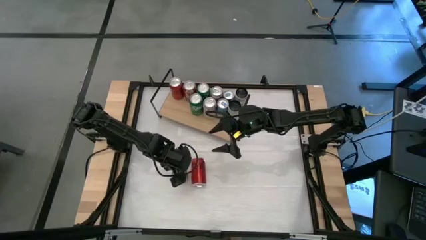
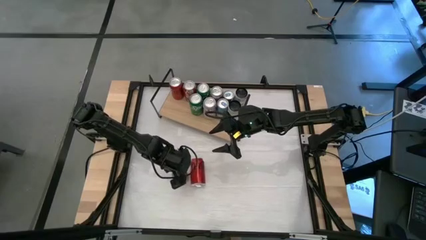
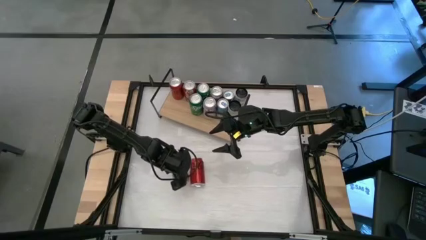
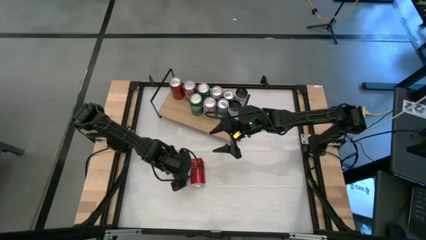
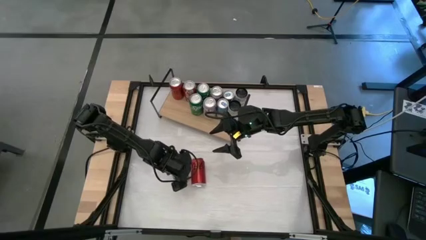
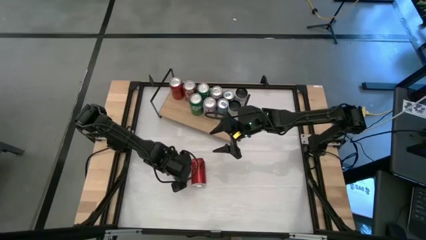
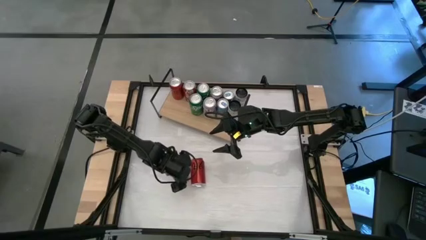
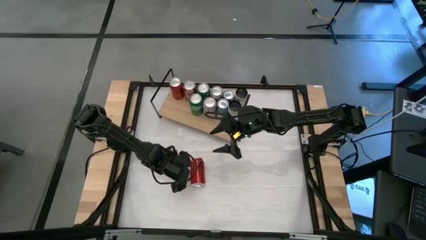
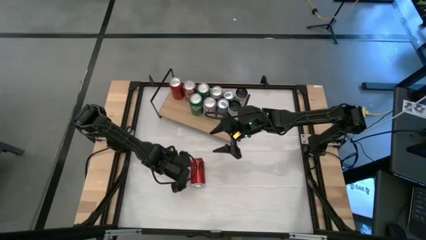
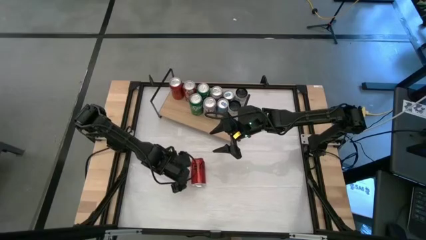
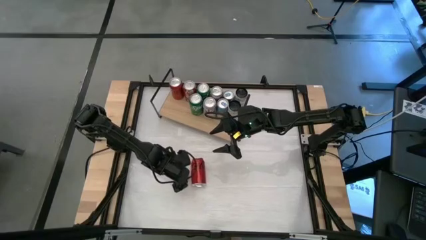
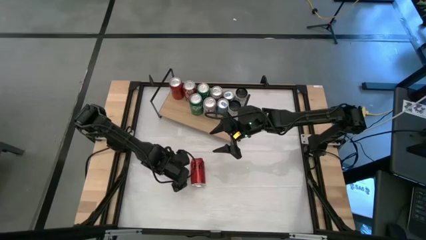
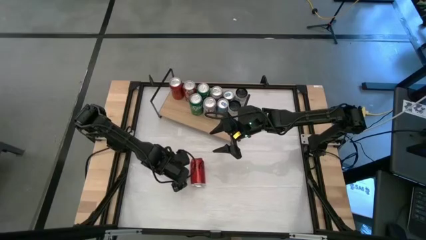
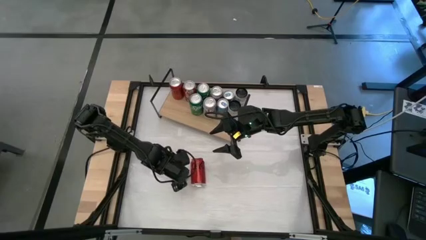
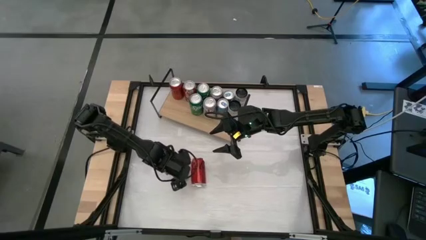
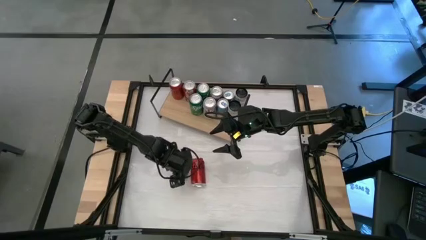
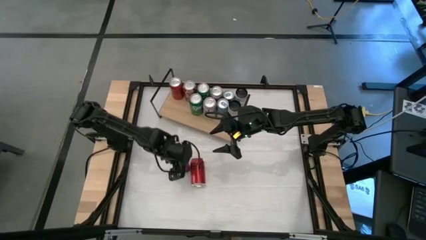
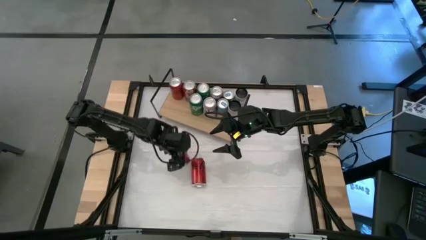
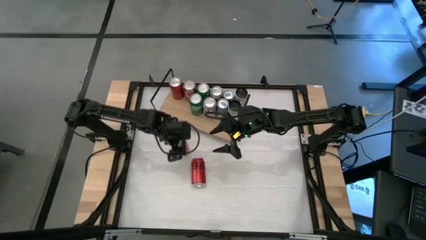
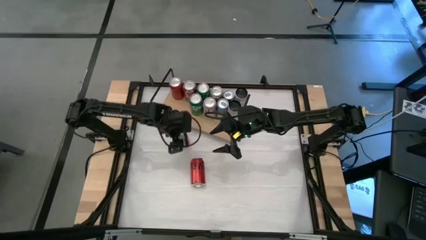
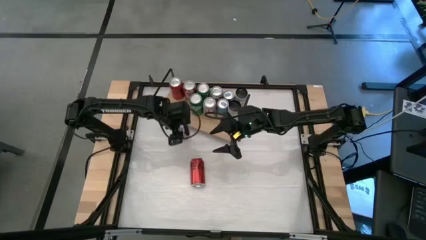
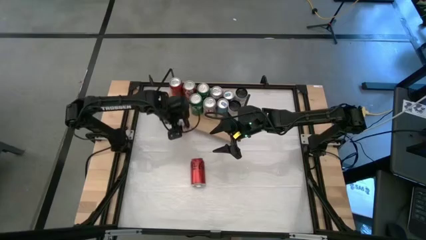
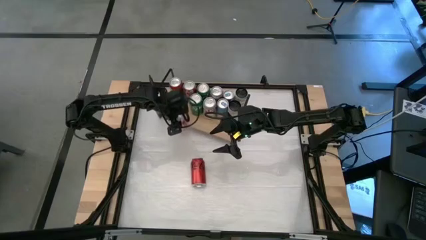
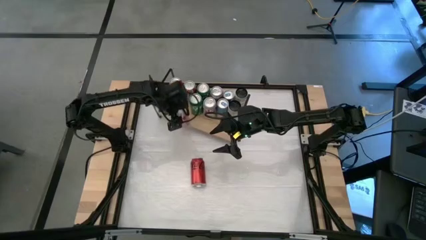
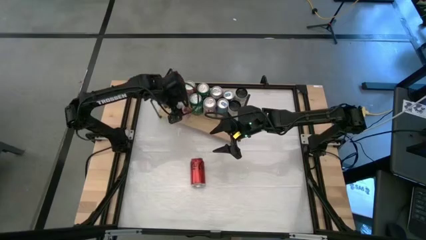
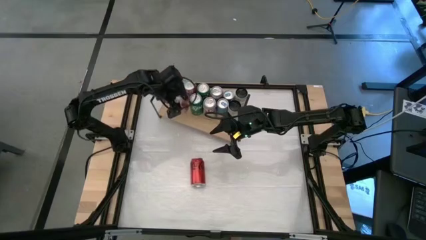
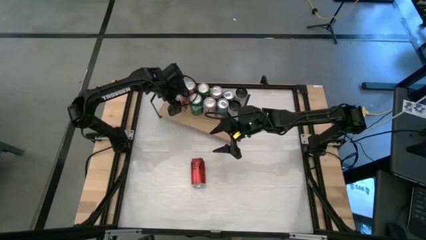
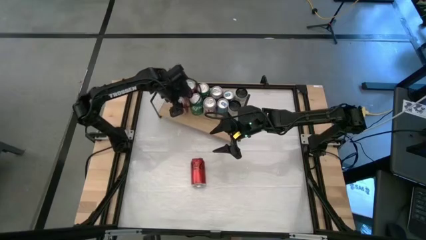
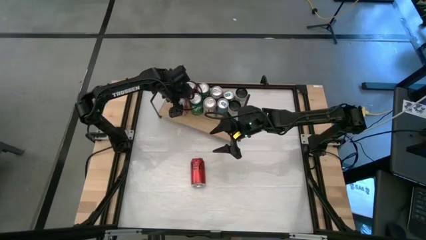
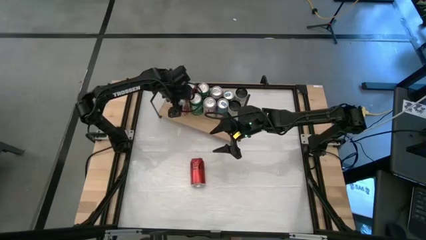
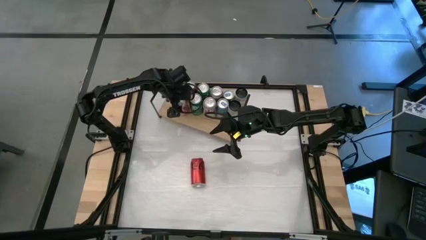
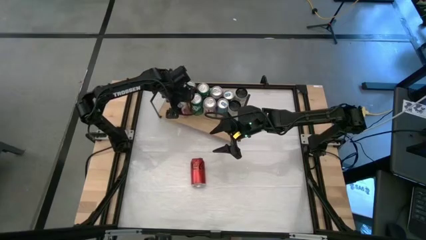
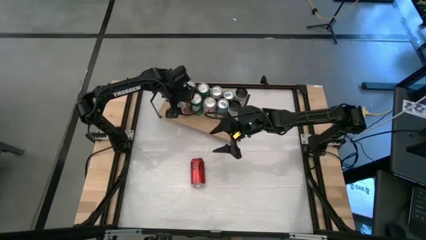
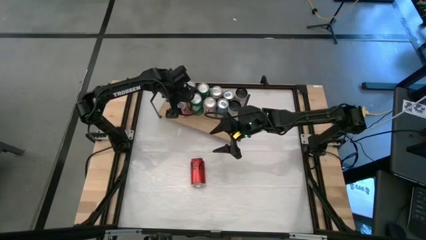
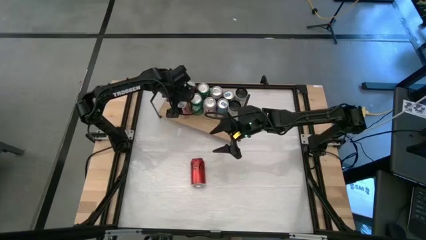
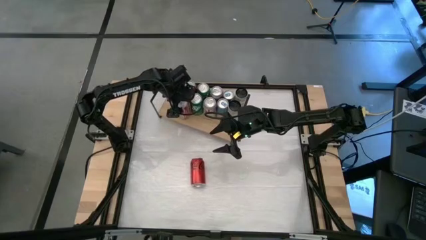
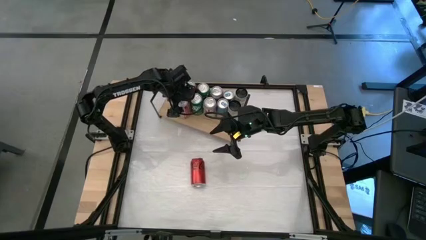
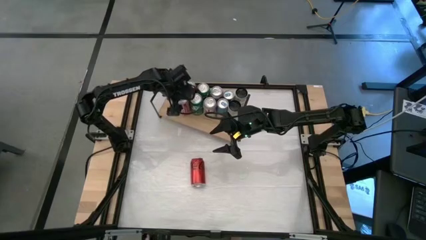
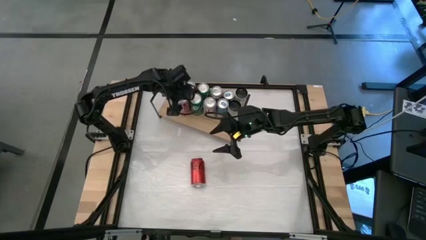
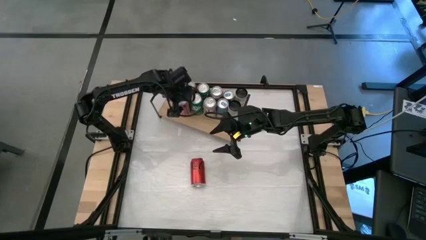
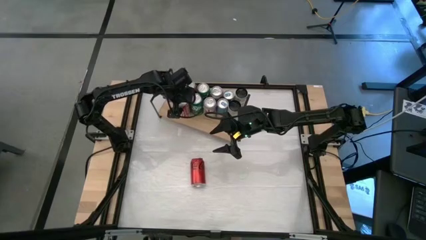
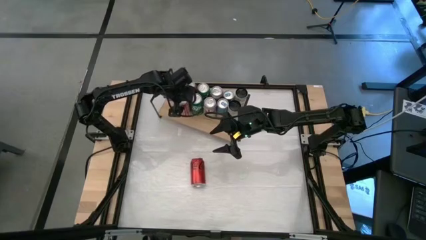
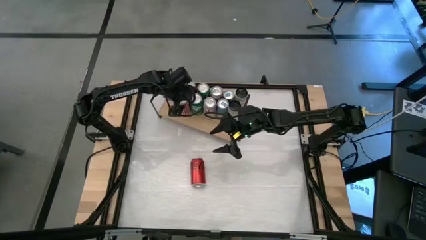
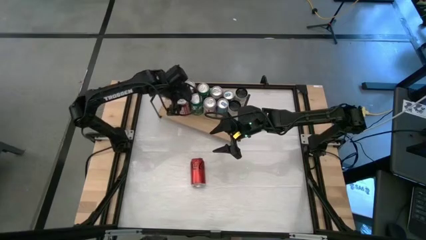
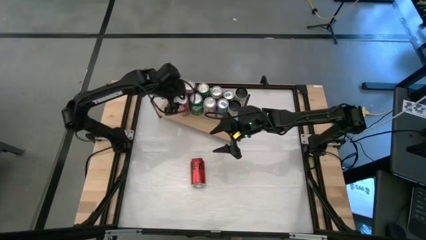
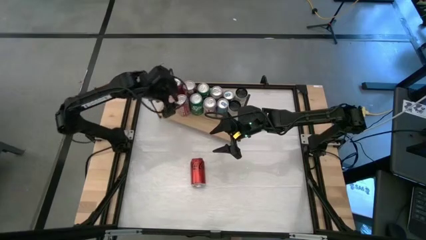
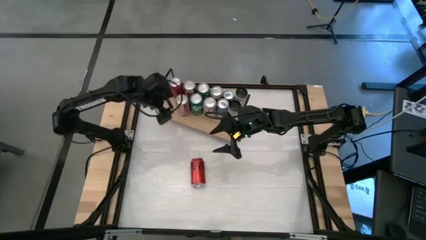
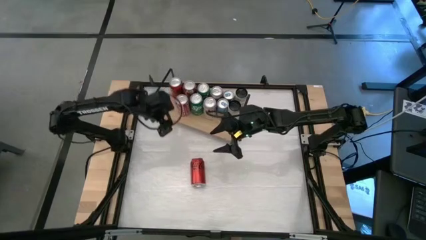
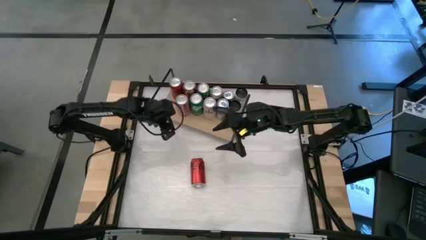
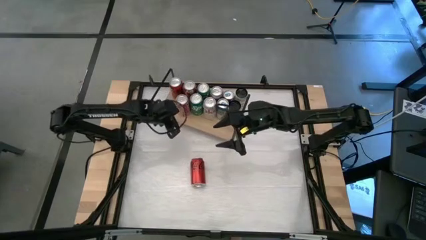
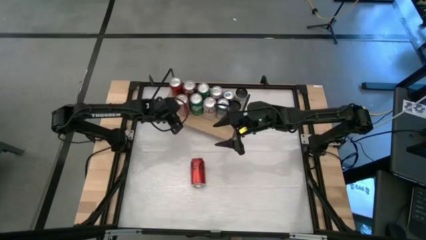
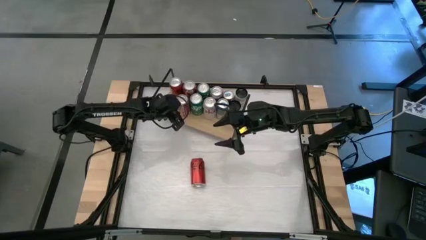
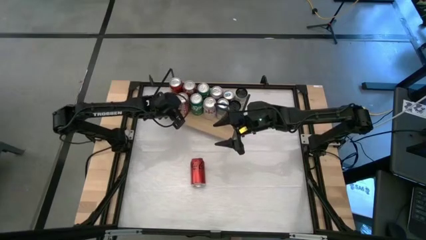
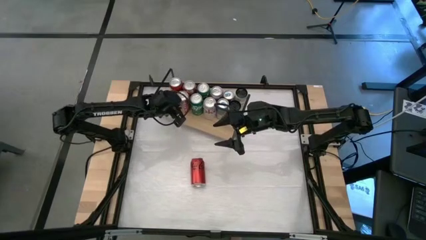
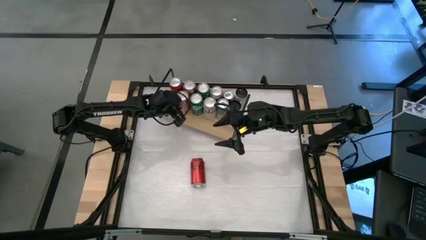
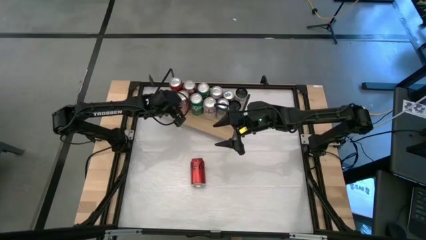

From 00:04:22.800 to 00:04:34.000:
Task: Place canned beverage on shelf
Put the red white soda can on the shelf aligned with other red white soda can

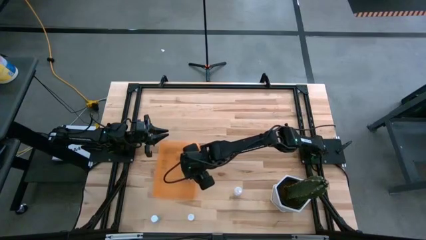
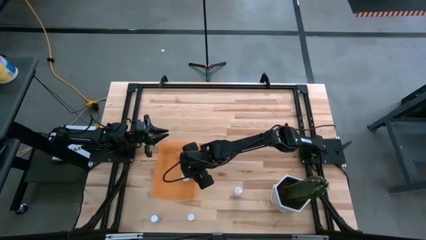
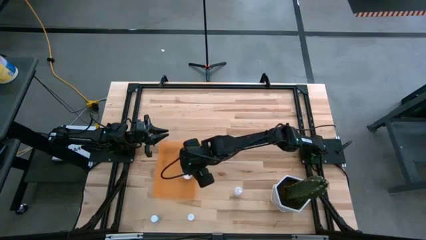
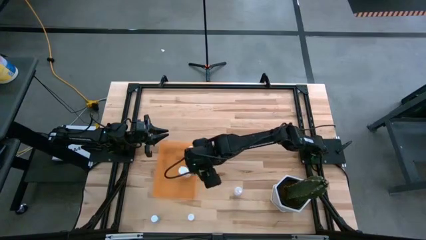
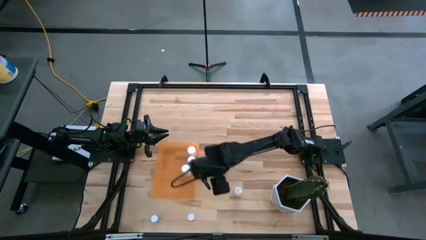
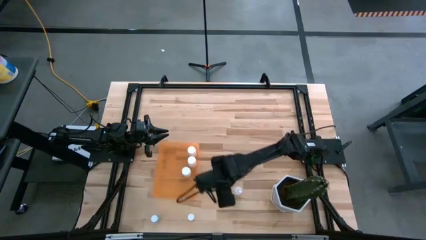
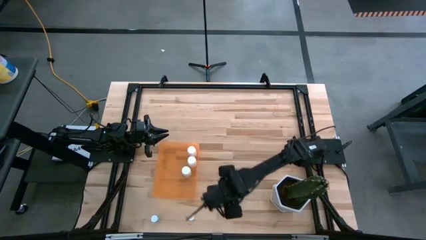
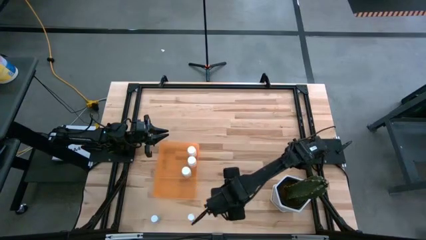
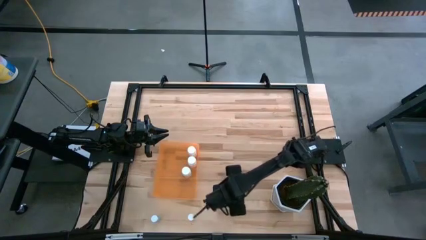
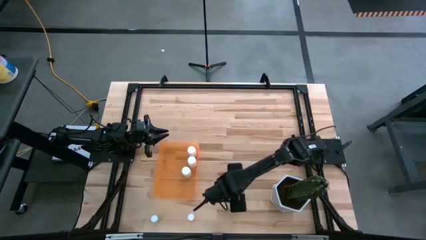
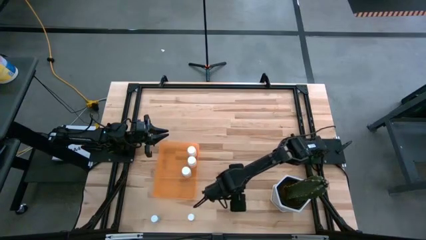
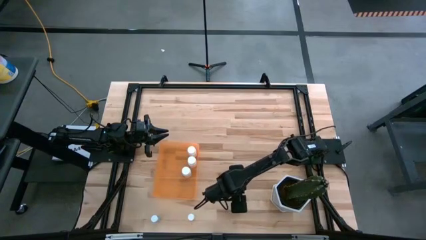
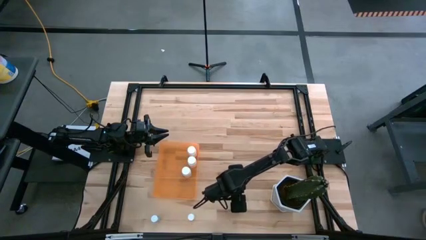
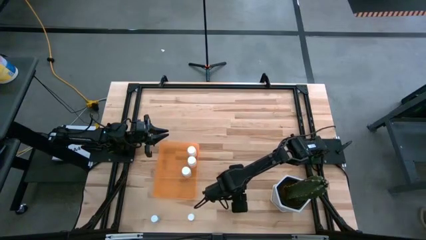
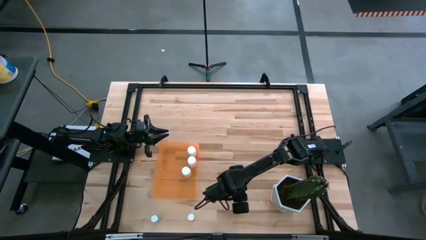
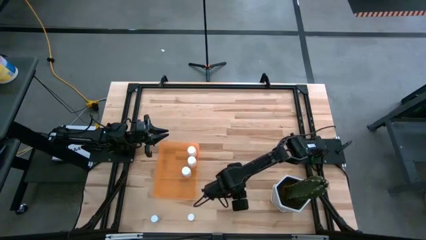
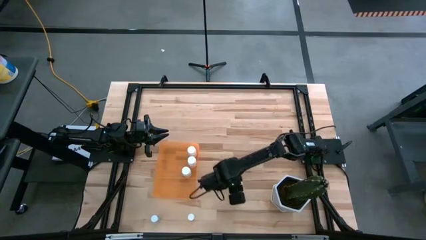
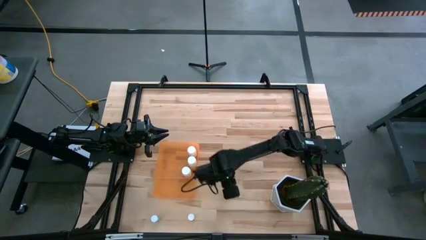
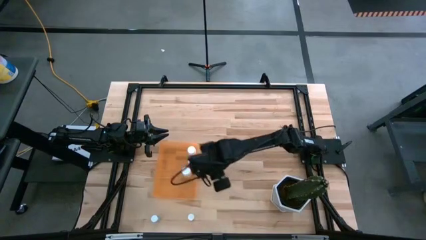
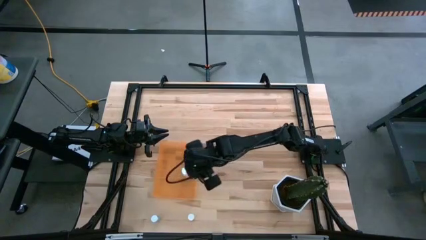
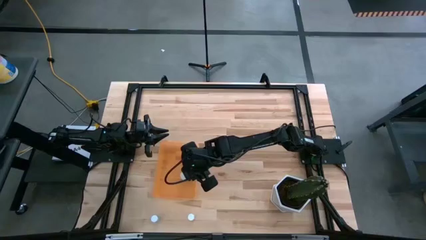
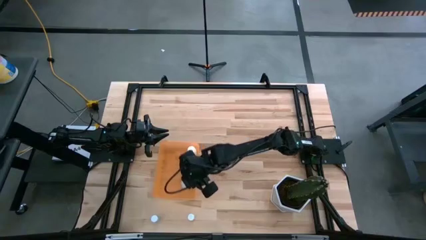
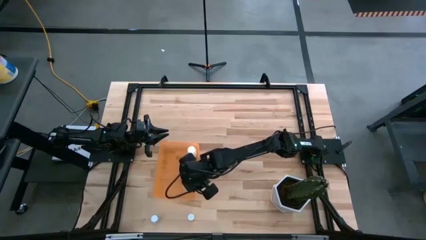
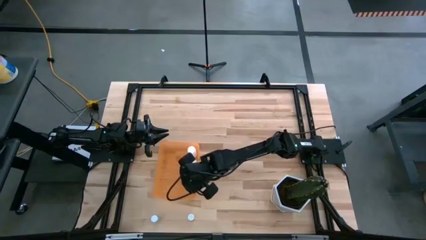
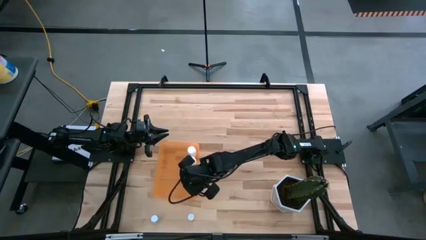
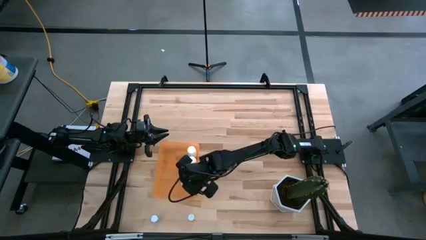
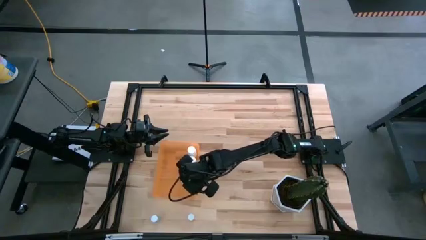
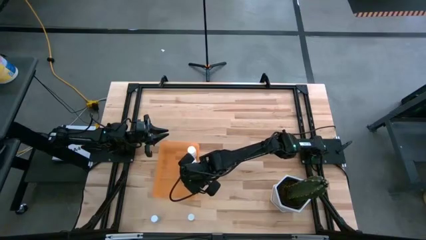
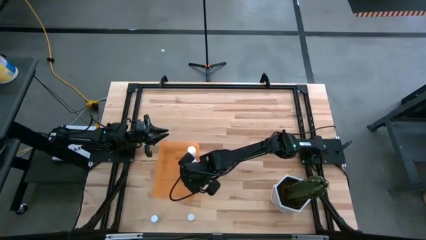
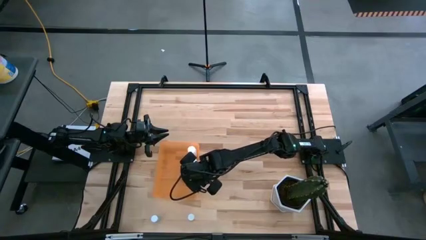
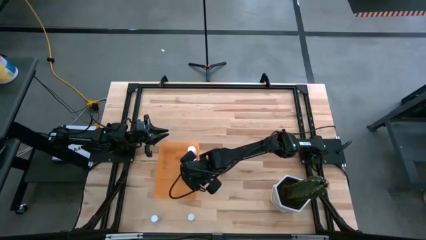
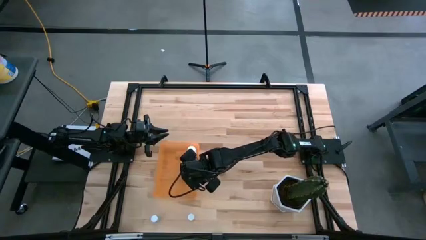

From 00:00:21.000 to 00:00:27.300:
Task: Pick and place pill bottles into a basket
Put the transparent pill bottle into the orange bin
